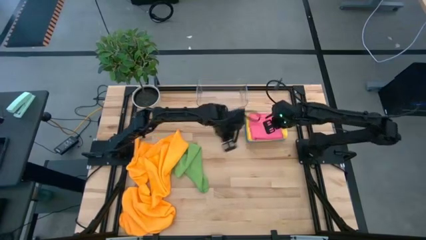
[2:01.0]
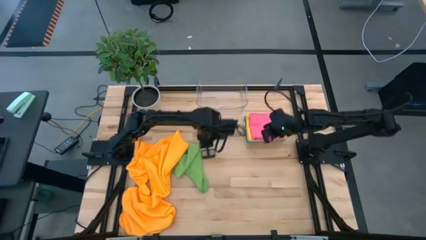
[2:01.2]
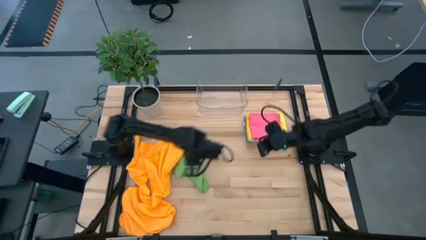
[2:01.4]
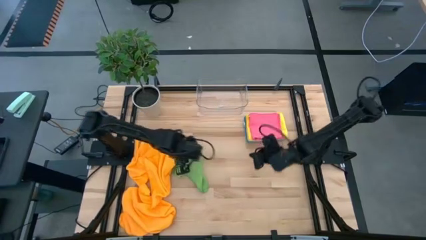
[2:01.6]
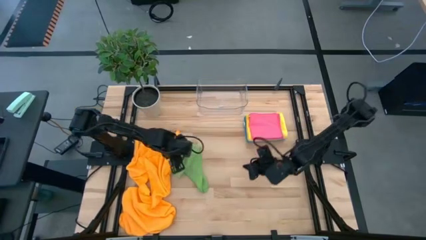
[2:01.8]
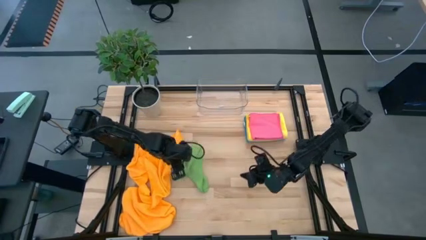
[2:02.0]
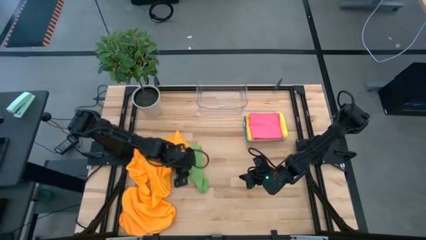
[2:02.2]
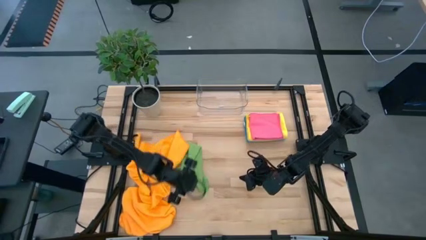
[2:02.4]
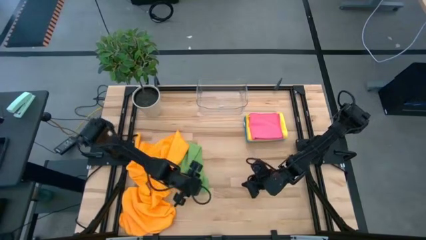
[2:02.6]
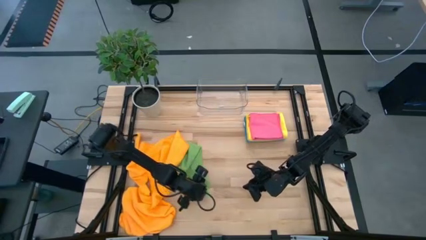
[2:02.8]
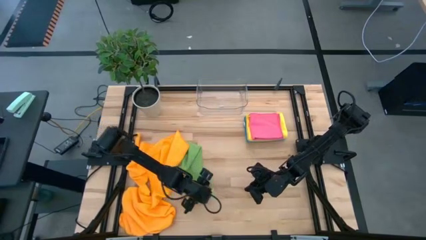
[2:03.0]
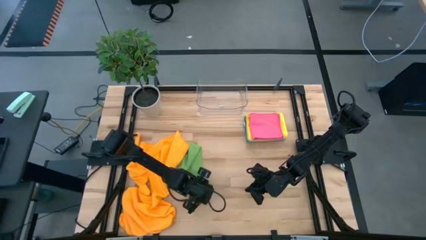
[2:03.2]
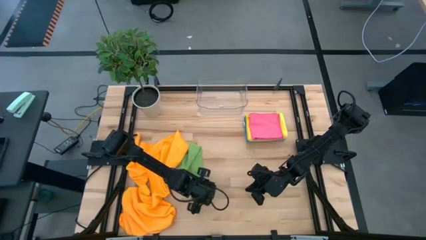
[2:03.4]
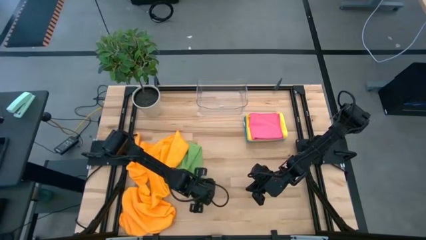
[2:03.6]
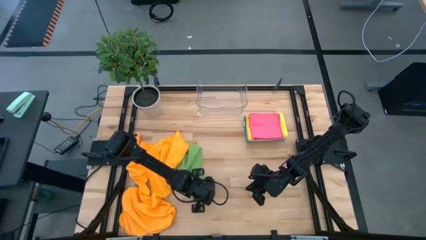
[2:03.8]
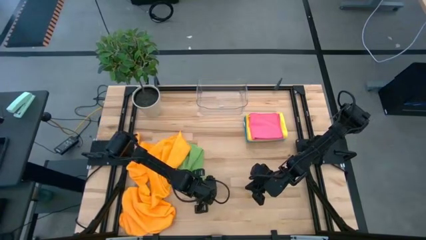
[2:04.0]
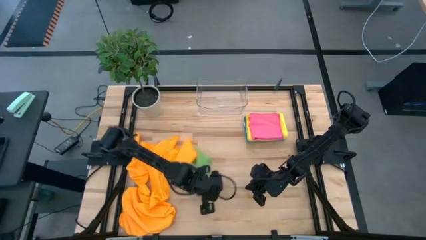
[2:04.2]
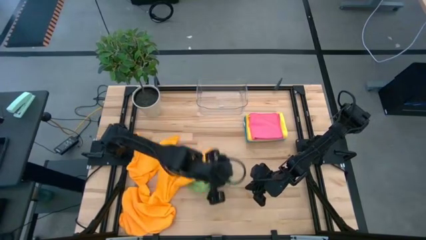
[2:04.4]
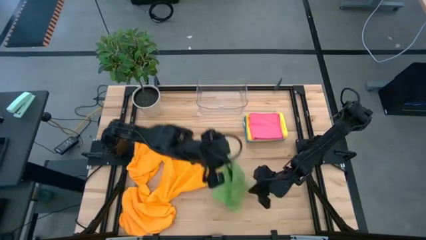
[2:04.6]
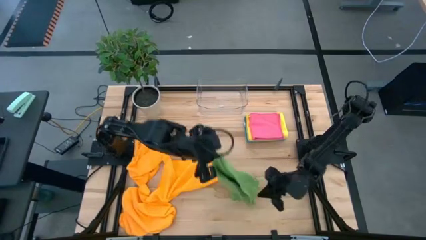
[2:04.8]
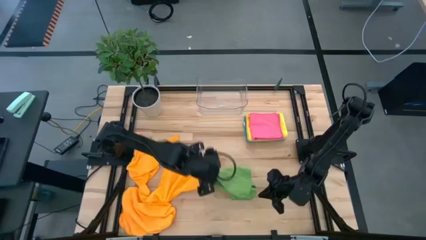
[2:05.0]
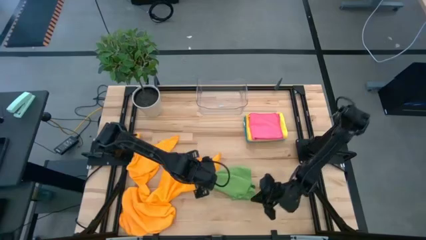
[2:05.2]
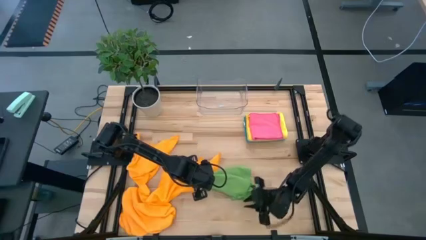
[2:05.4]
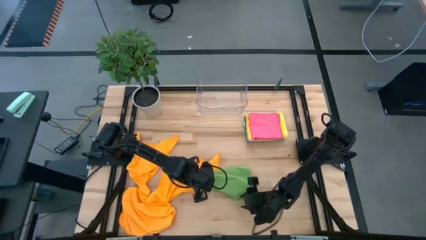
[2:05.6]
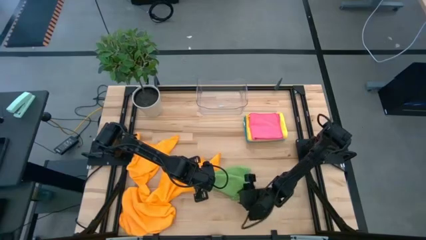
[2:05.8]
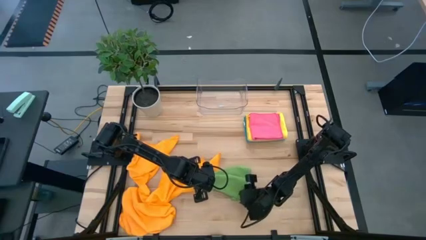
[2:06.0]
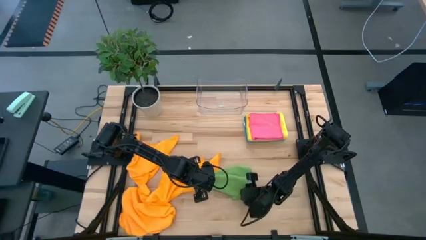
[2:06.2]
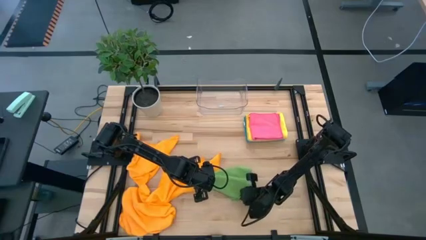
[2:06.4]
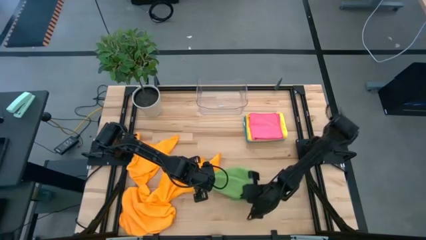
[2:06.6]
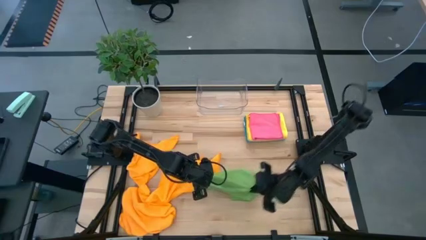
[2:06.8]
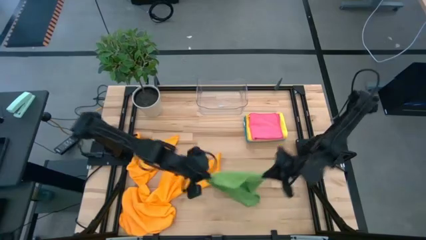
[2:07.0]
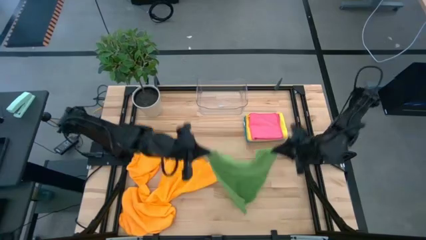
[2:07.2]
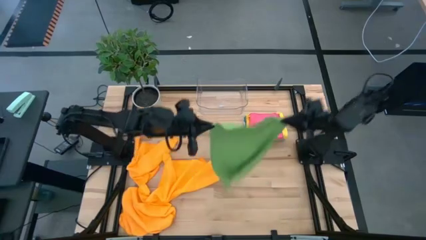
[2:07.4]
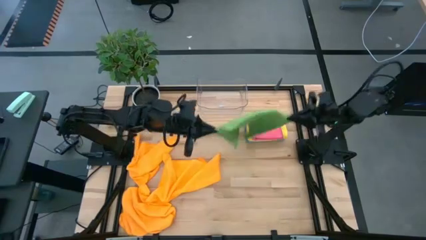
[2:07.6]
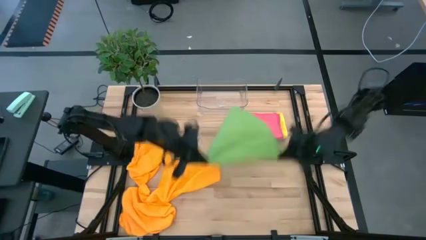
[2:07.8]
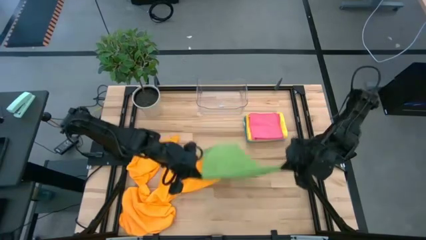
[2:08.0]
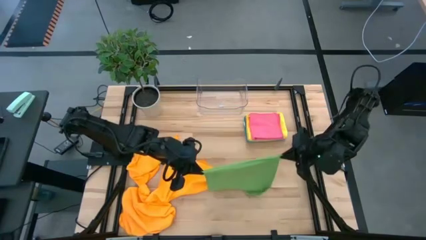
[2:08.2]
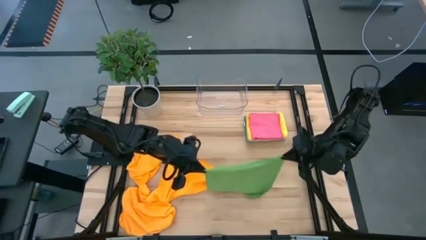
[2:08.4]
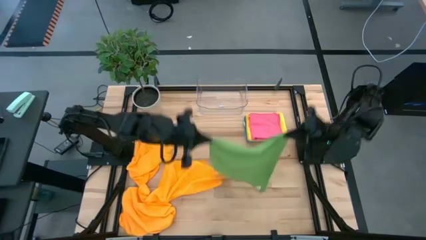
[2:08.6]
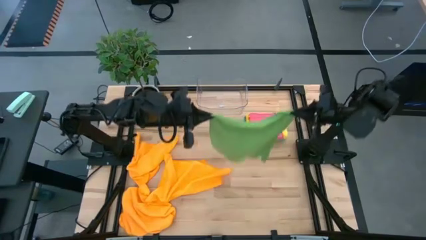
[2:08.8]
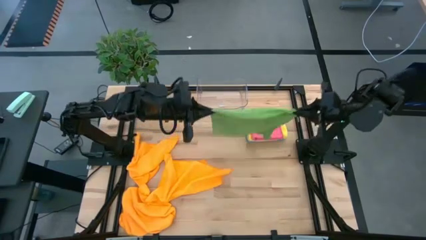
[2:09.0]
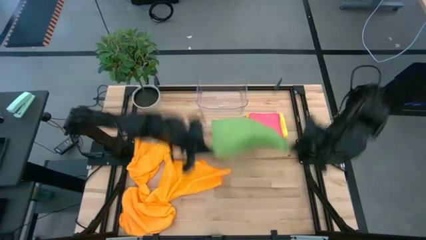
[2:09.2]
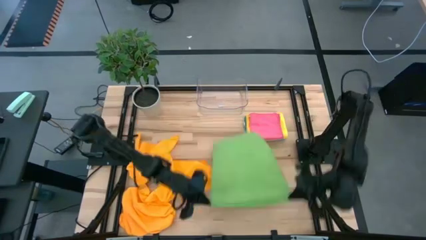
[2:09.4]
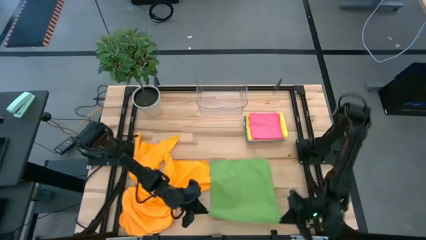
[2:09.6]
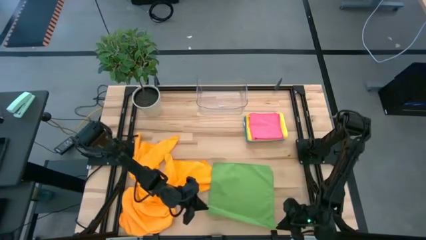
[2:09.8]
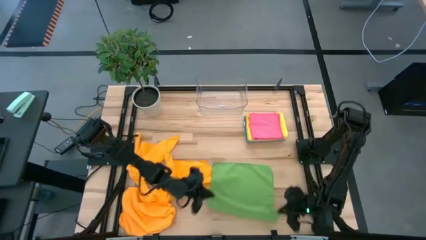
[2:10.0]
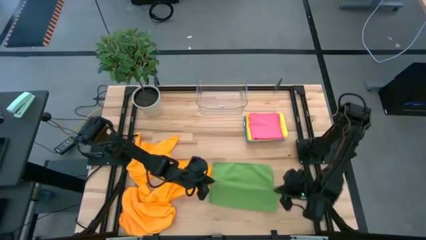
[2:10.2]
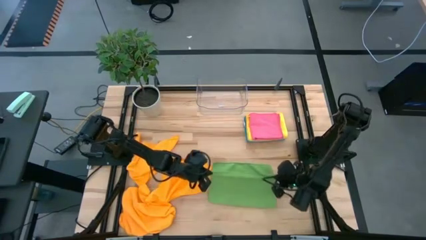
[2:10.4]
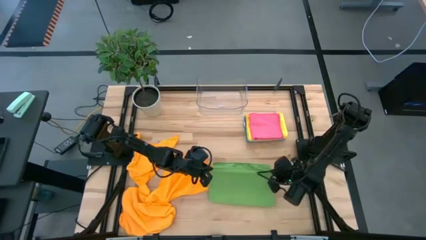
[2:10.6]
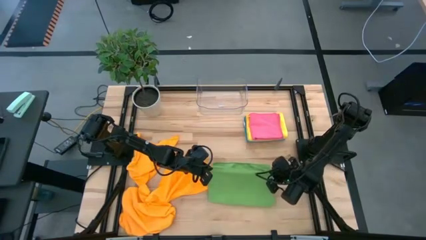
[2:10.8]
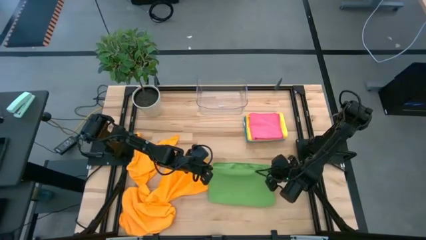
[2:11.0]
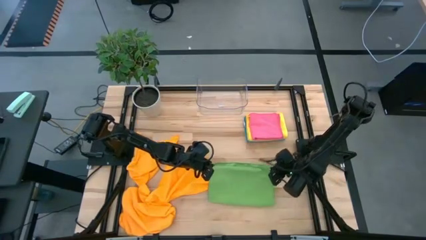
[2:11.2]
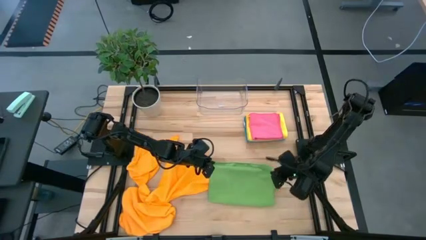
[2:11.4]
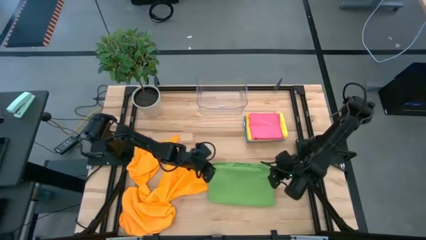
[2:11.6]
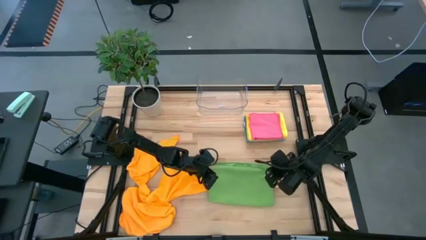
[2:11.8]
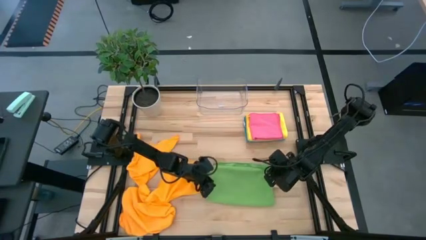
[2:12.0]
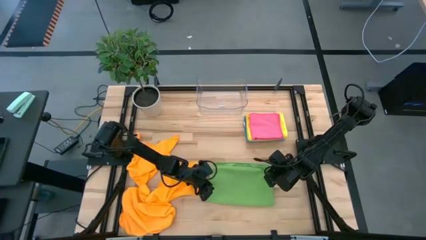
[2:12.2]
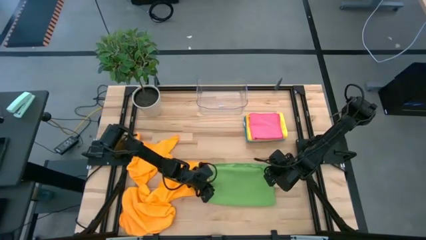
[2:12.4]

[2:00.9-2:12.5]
Task: Fold microfiber towels
Fold the green towel

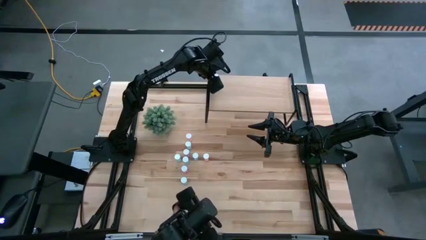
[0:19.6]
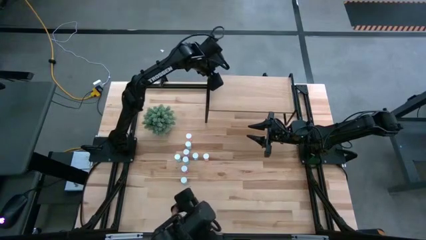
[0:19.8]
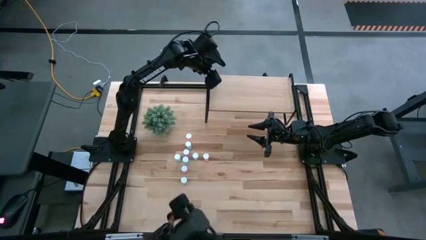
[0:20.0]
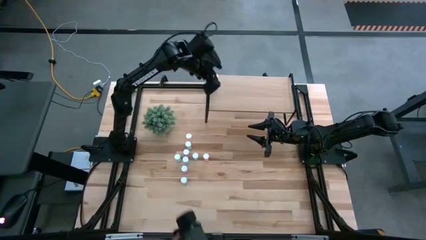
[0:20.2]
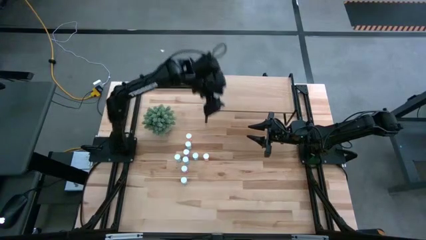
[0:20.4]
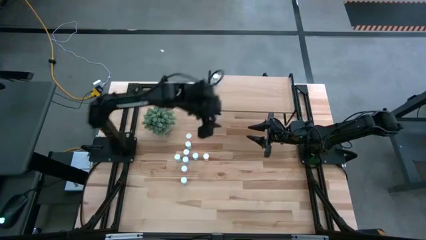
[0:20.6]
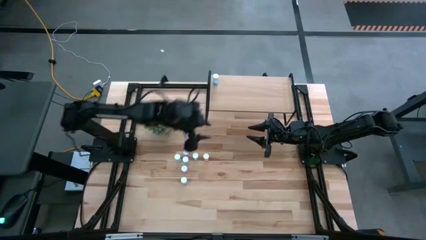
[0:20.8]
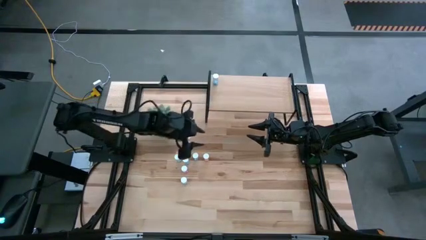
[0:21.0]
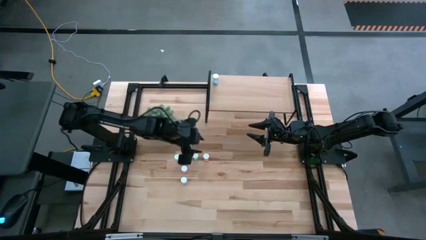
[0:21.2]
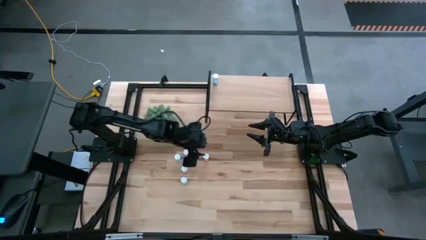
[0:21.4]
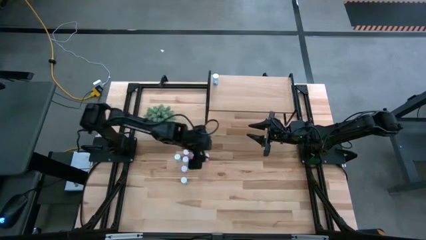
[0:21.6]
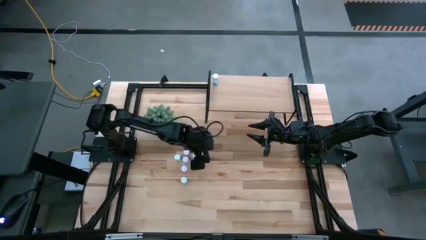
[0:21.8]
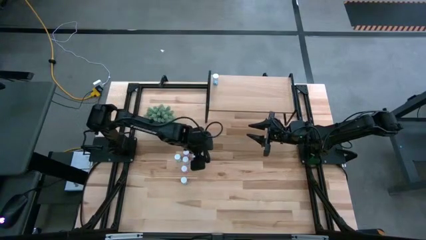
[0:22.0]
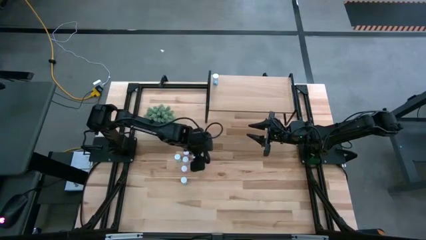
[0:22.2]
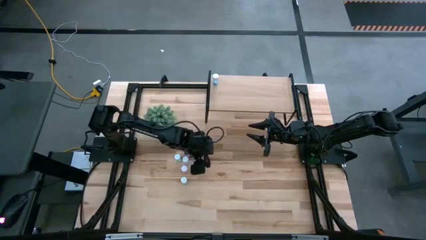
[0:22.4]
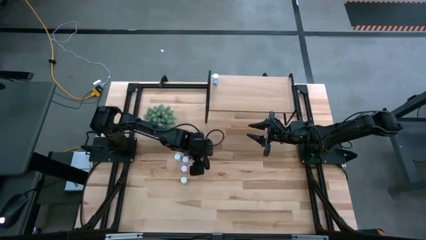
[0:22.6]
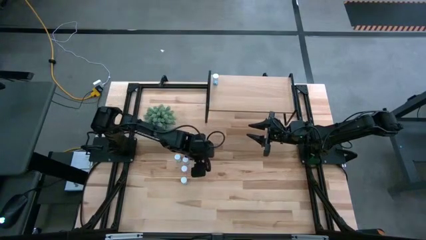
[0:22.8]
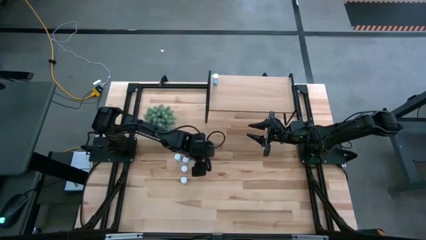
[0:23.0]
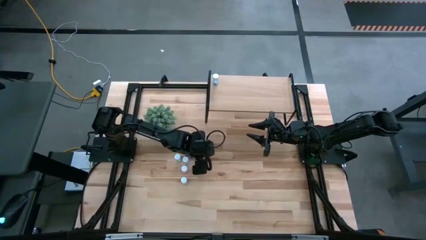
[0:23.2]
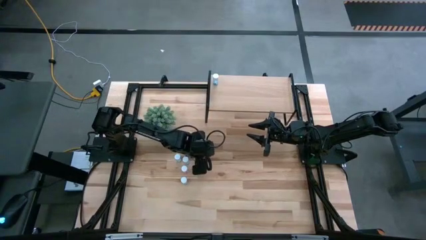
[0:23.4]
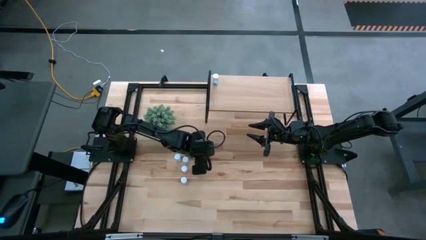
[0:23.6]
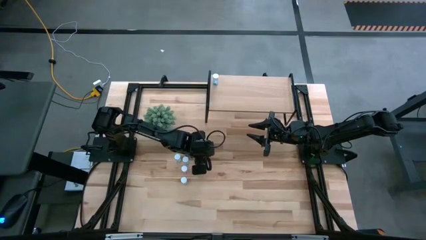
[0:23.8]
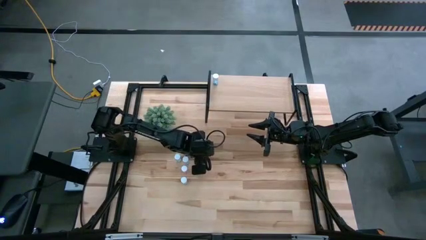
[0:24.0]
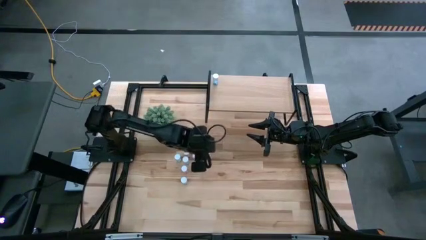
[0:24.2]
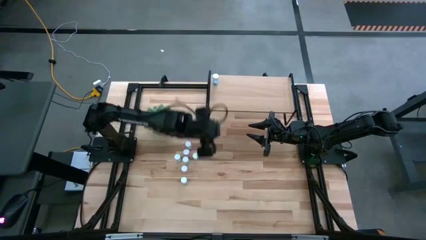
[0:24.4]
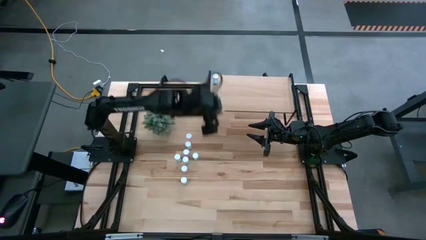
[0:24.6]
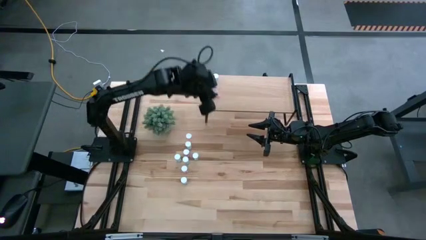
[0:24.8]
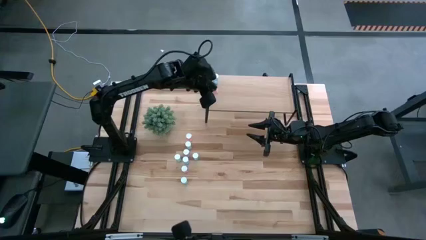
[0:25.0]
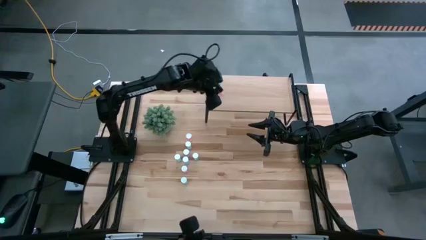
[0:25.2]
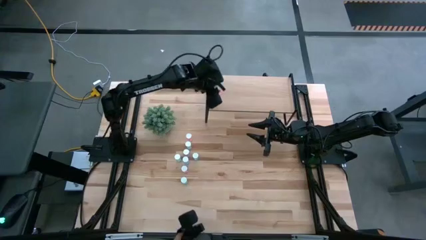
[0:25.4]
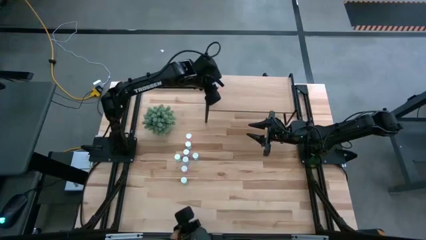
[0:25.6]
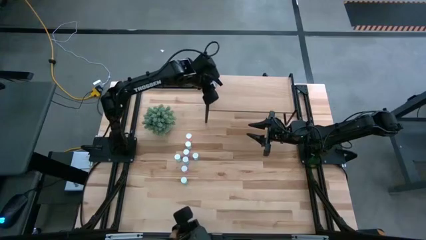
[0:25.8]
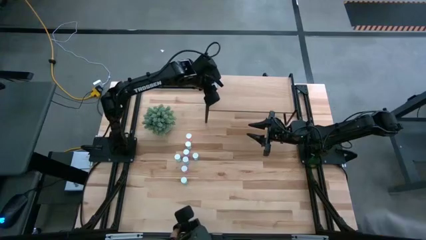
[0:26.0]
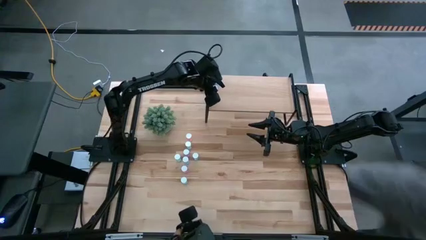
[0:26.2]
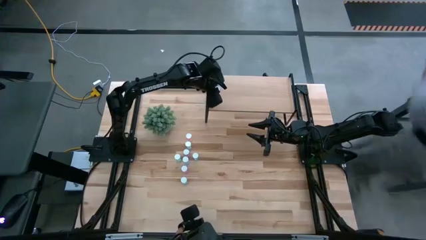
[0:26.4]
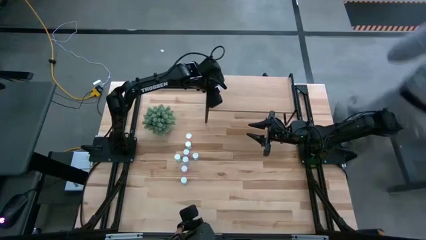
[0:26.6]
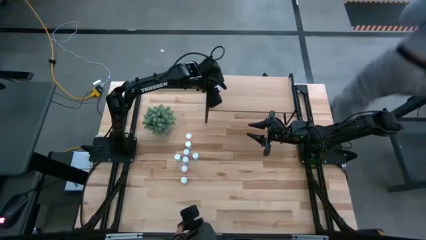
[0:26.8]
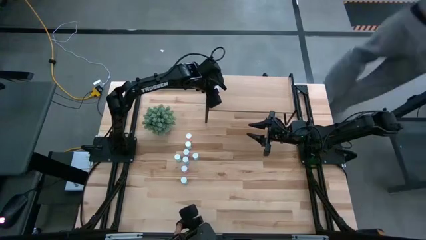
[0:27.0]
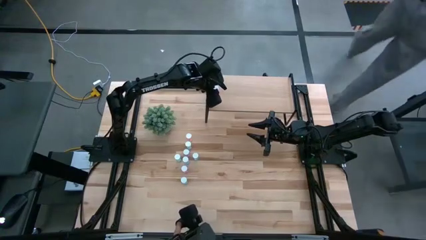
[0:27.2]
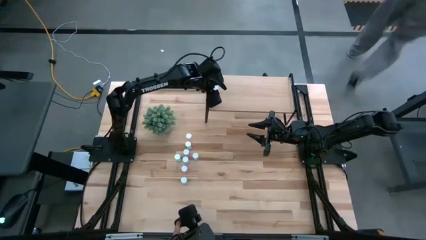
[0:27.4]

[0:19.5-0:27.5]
Task: Pick and place medicine bottles onto shelf by color
Put the transparent orange medicine bottle on the shelf
